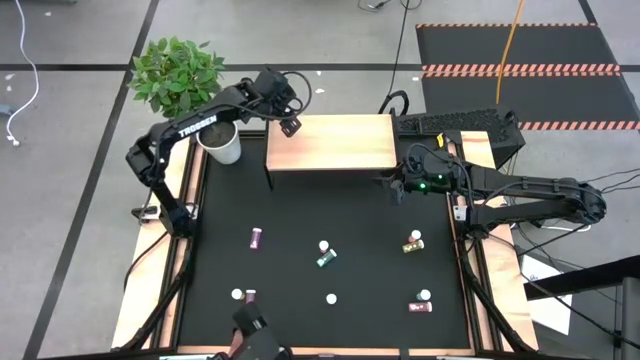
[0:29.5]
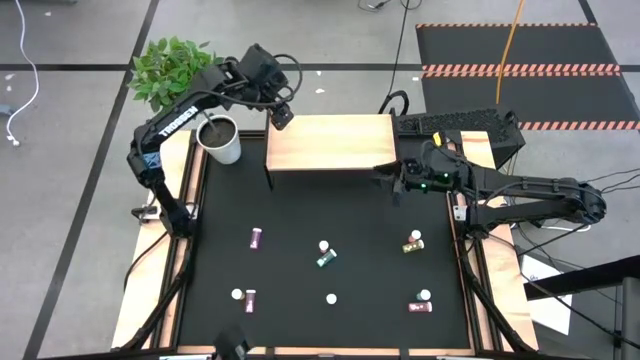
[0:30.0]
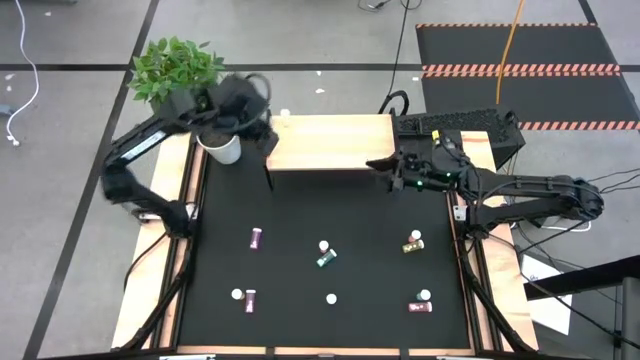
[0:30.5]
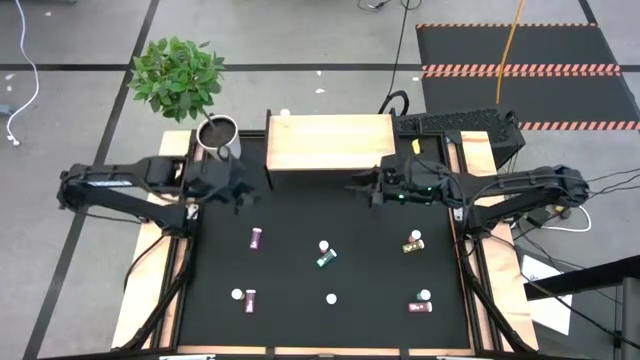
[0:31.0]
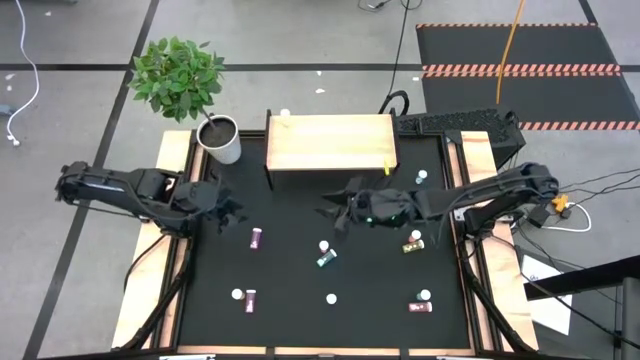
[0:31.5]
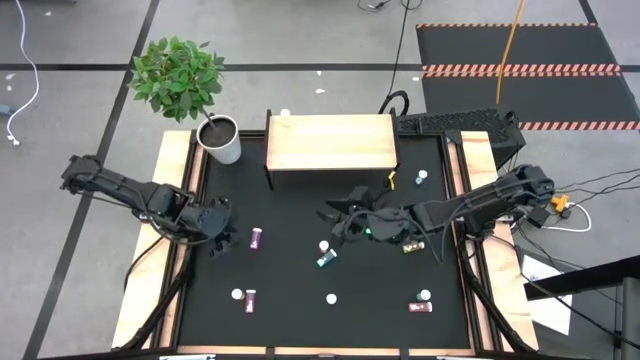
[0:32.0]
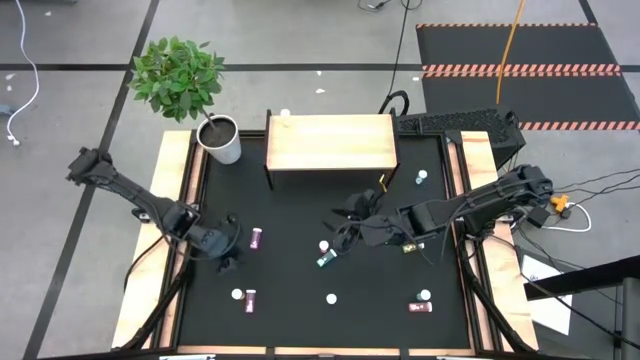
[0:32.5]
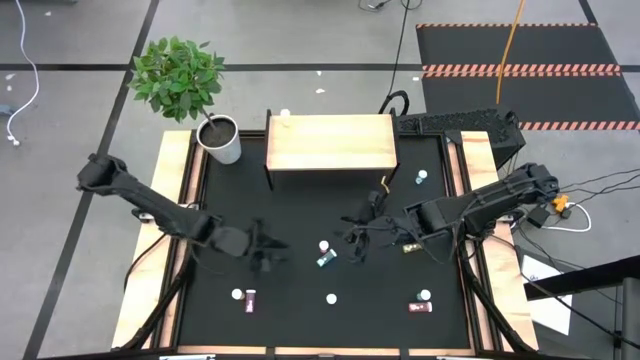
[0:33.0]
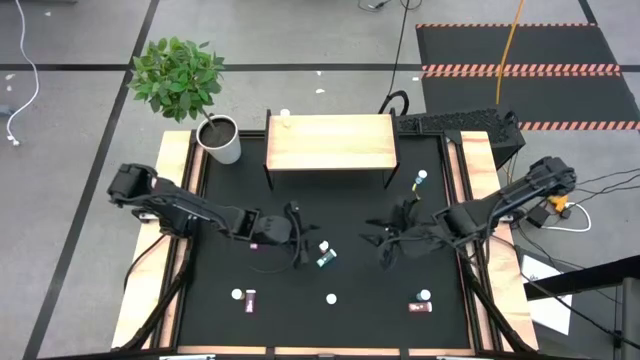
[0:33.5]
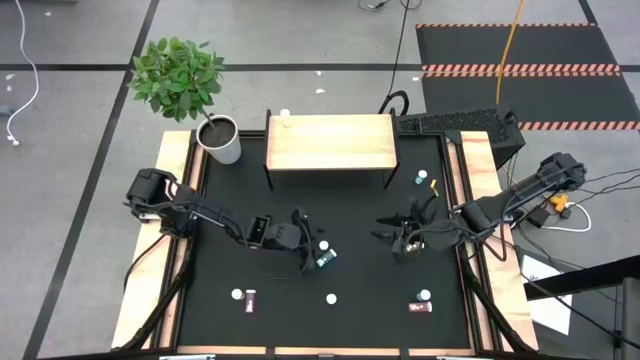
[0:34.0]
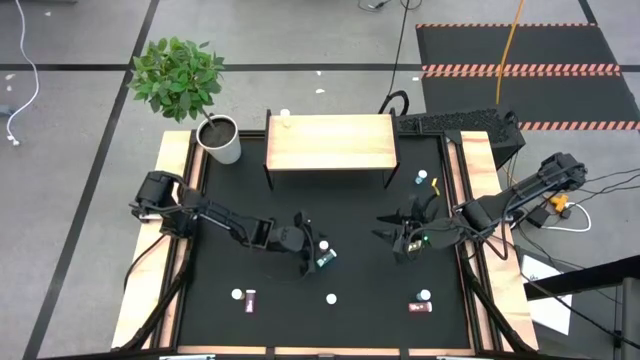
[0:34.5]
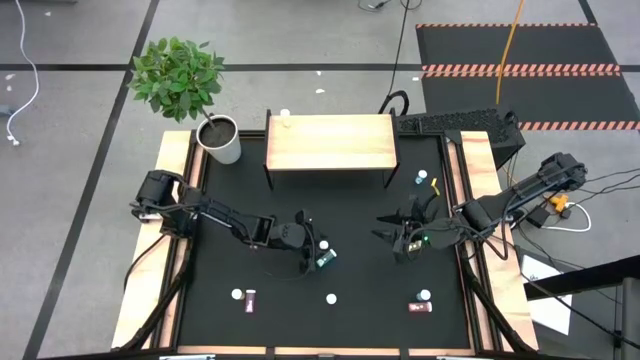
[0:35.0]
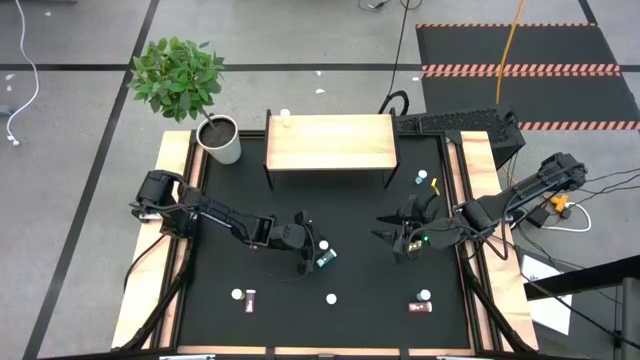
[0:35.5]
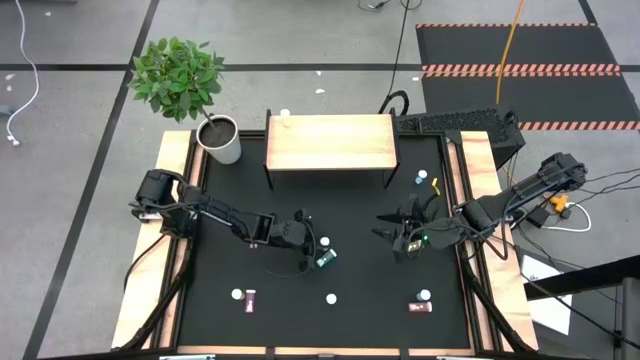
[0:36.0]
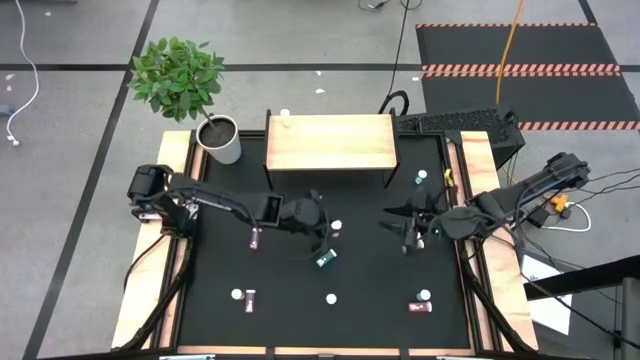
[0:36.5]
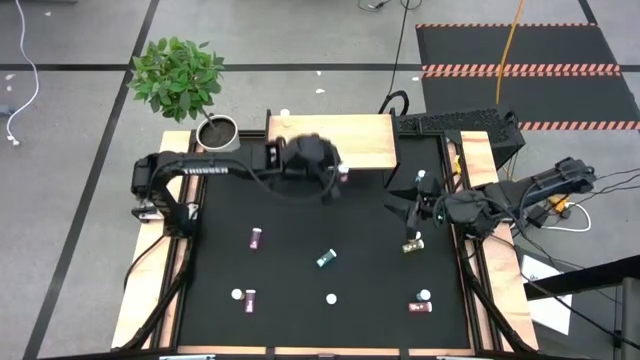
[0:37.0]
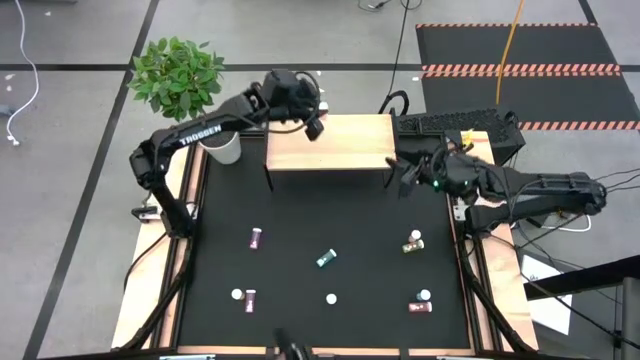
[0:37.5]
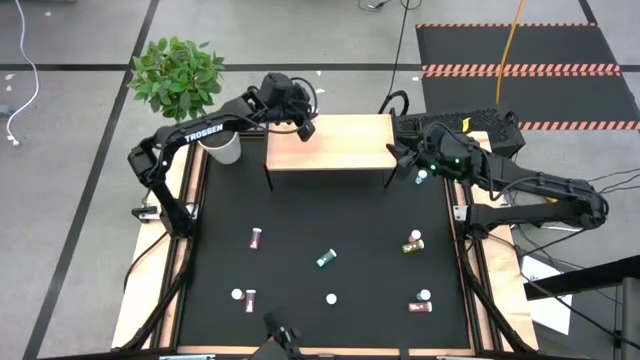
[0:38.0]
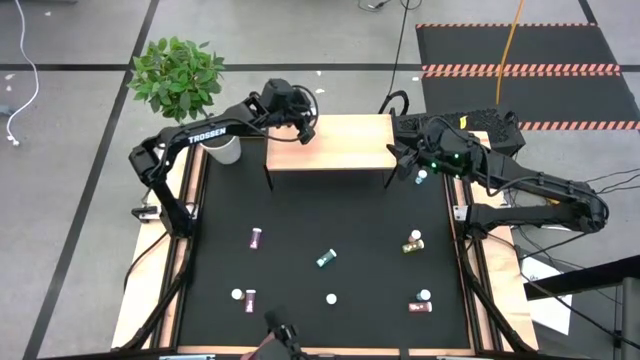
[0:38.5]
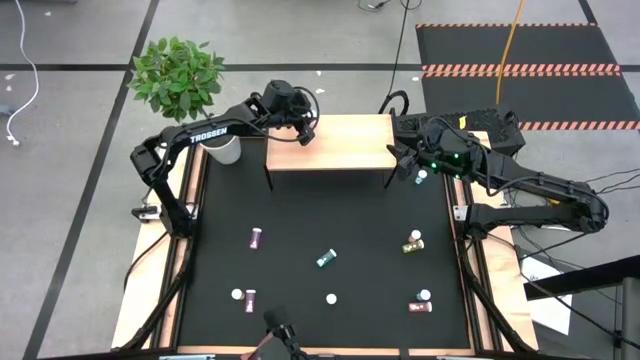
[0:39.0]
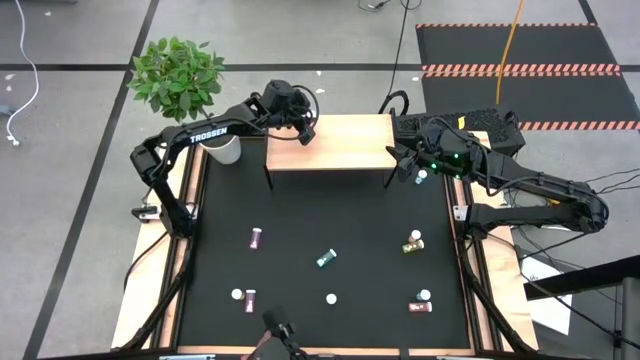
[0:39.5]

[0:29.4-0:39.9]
Task: Pick and place medicine bottles onto shelf by color
Put the top orange pill bottle on the shelf

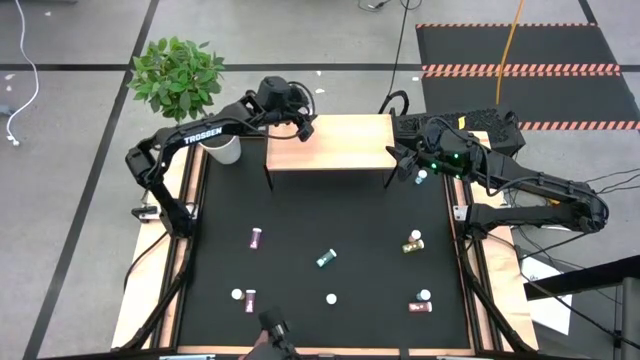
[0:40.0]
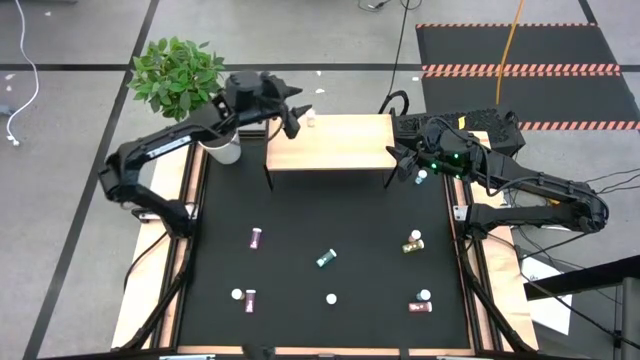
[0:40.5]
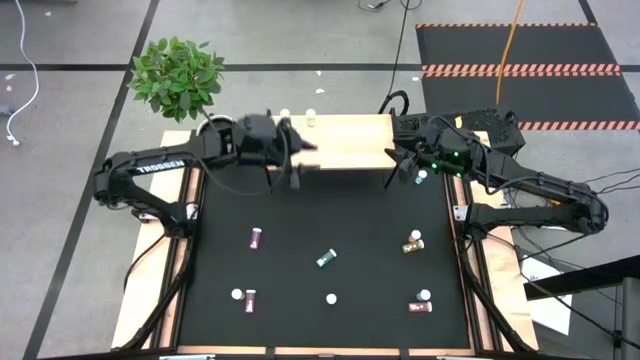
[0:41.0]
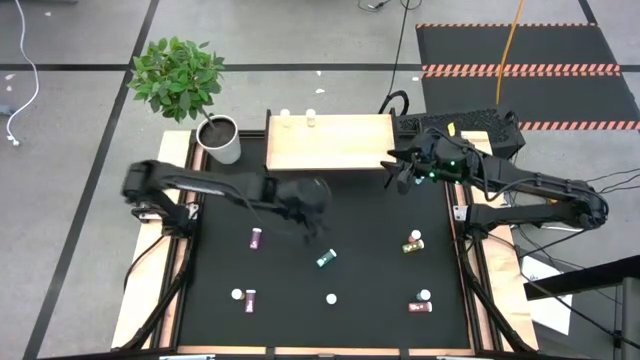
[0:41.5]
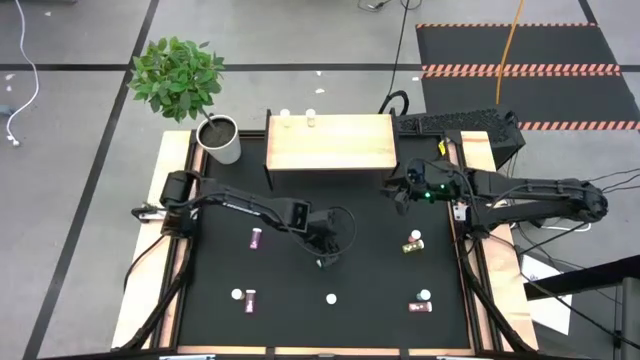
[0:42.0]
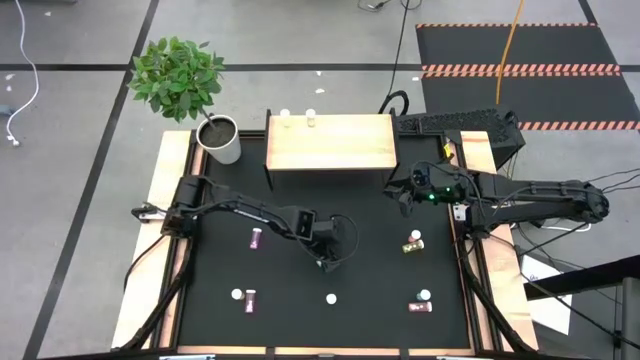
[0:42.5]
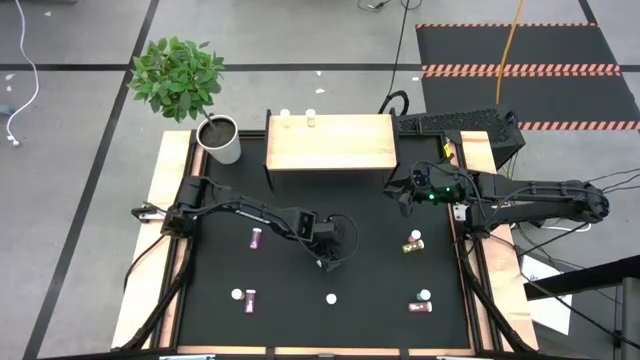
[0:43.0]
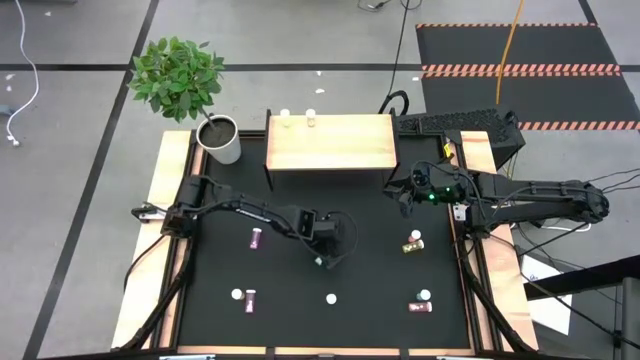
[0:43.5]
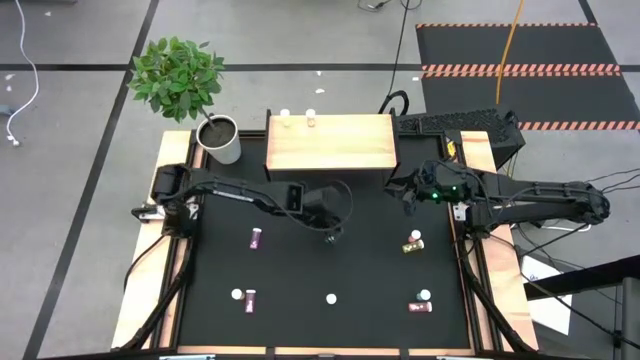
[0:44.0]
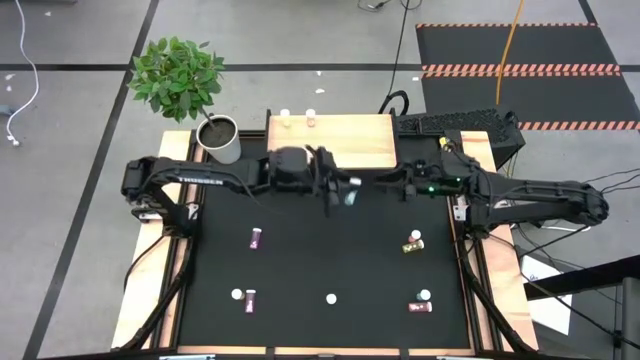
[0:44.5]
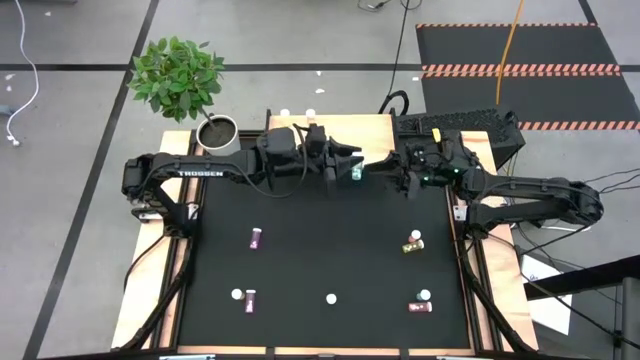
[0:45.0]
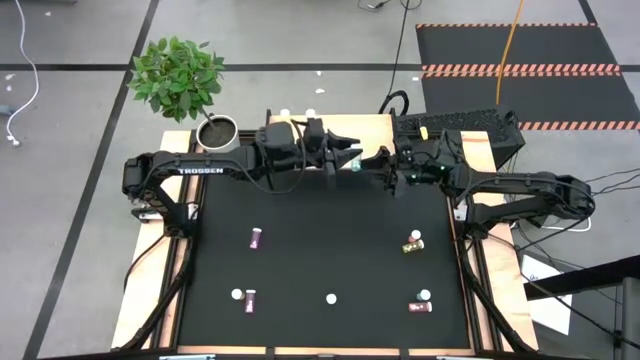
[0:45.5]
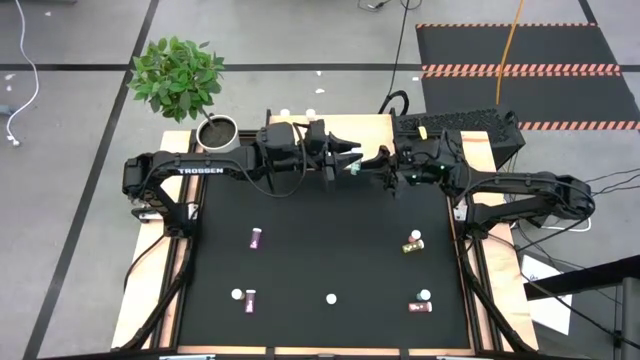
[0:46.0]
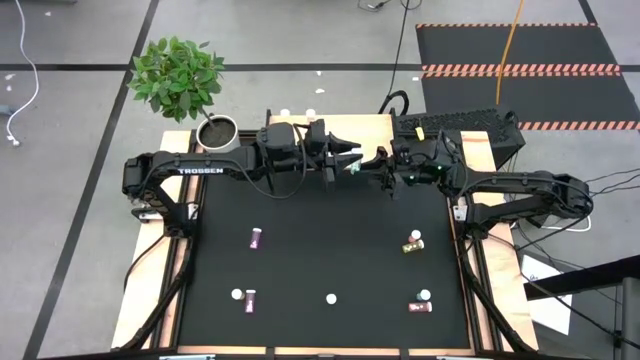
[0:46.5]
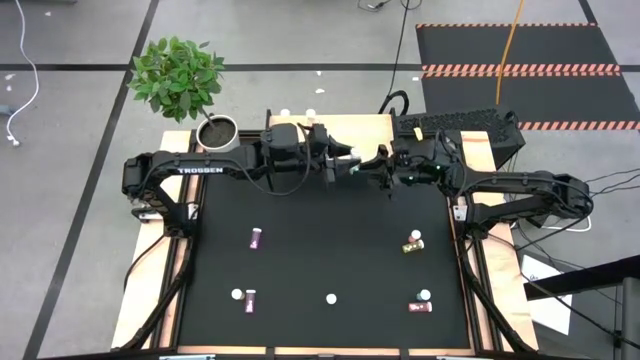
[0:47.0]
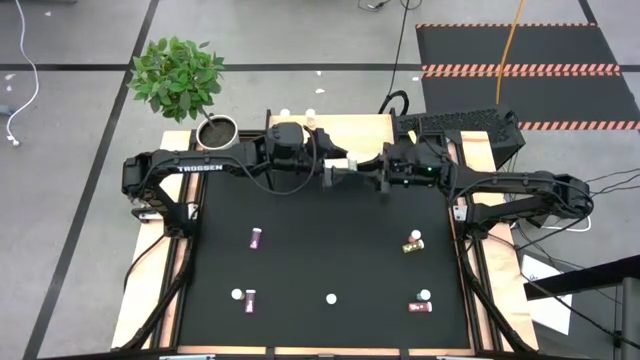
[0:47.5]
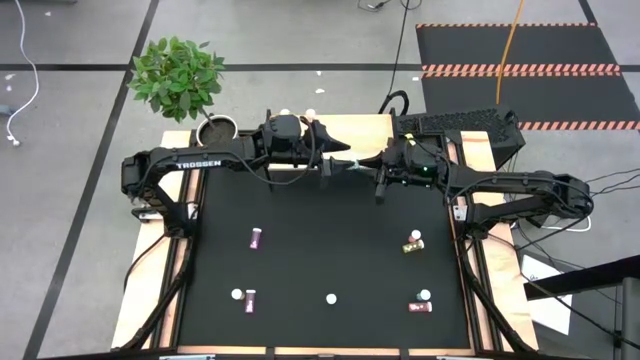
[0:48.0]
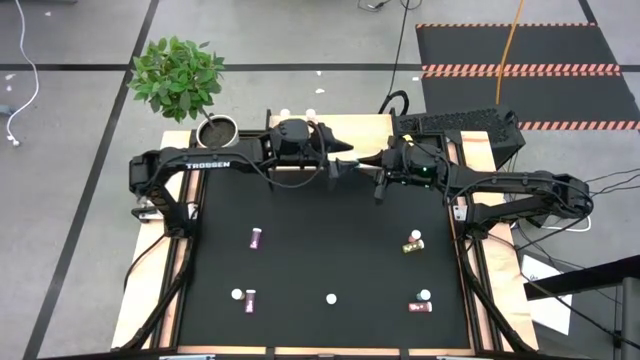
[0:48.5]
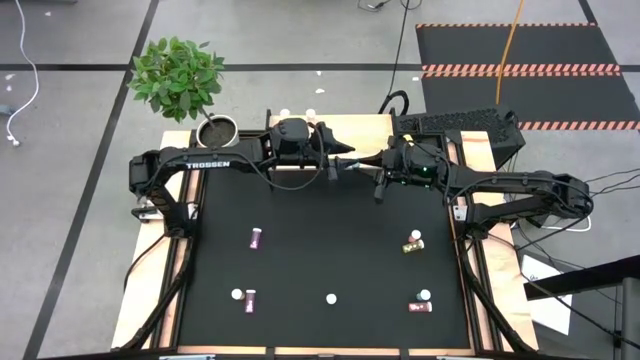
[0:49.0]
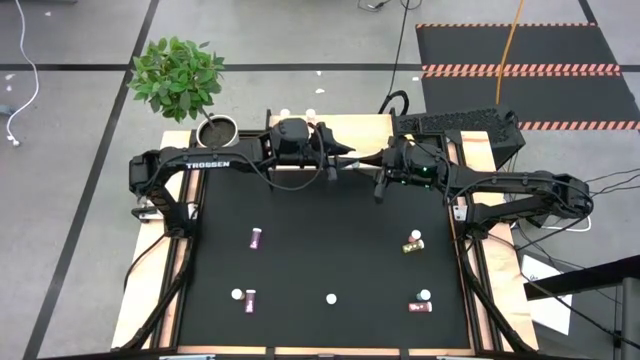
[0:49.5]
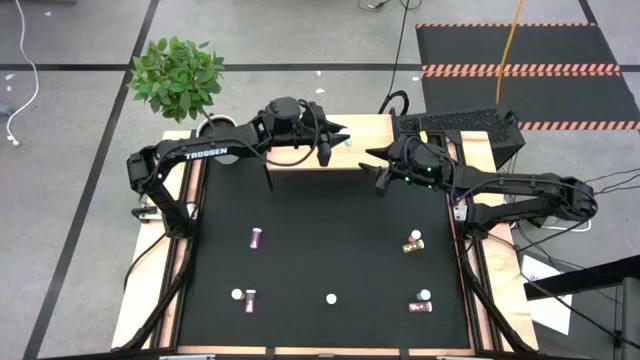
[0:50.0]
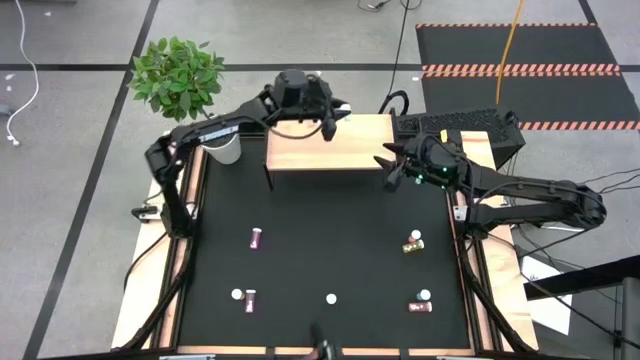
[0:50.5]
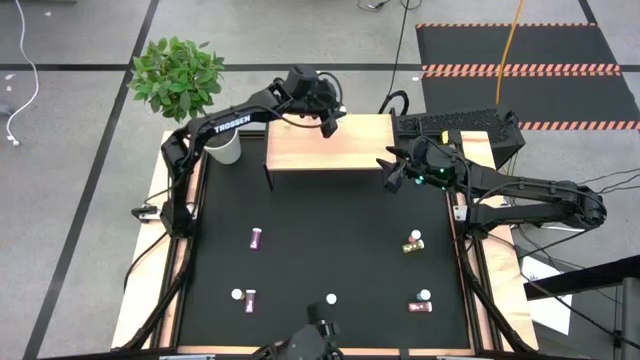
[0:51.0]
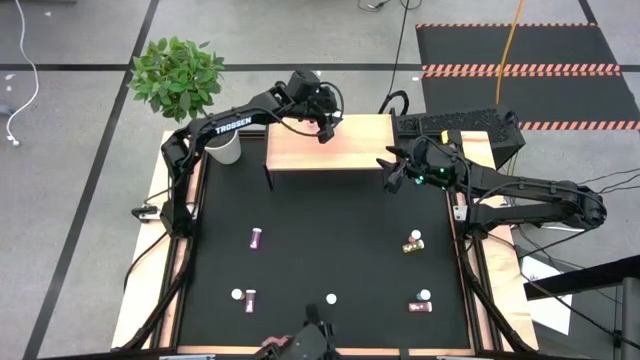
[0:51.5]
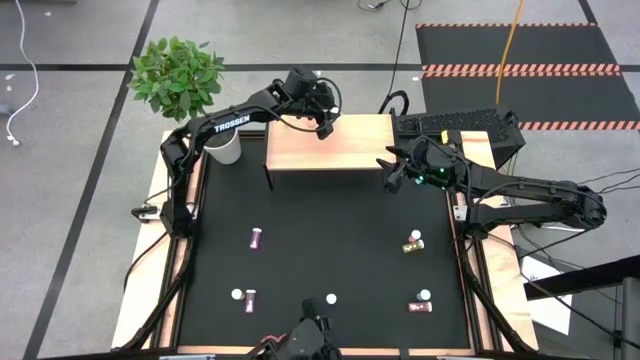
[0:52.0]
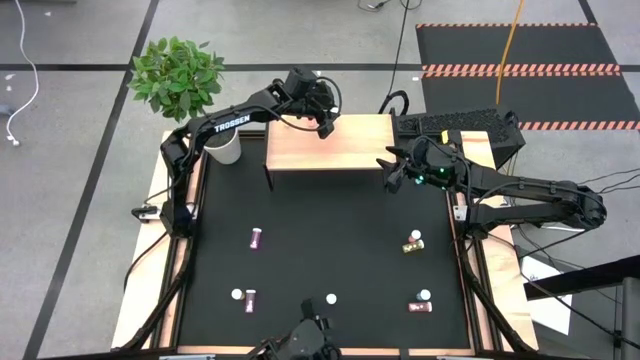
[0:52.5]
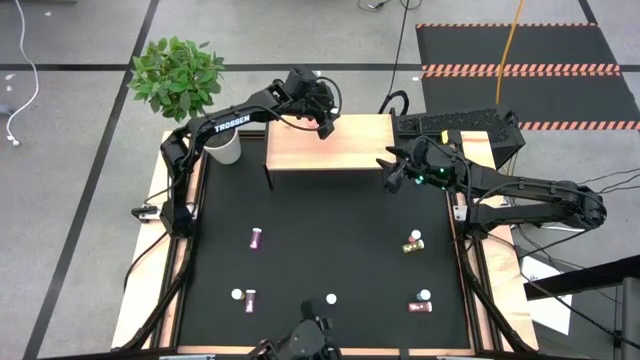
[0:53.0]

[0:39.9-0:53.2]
Put the middle blue pill bottle on the shelf
